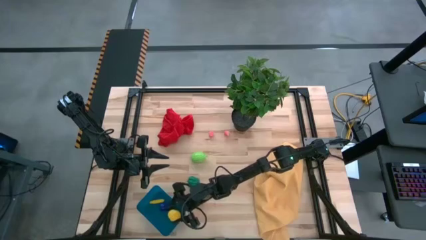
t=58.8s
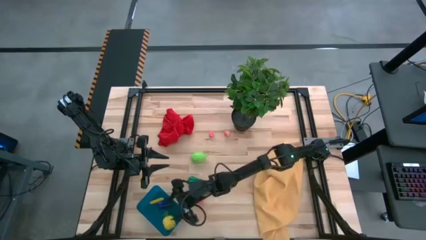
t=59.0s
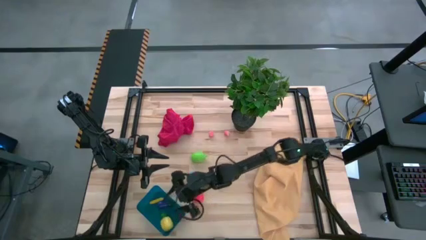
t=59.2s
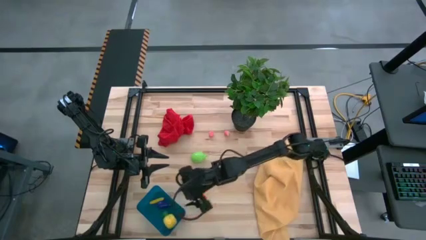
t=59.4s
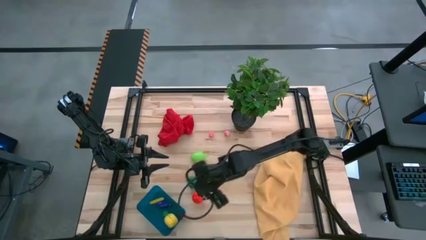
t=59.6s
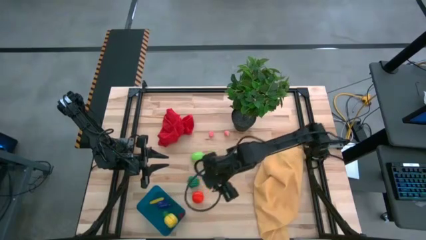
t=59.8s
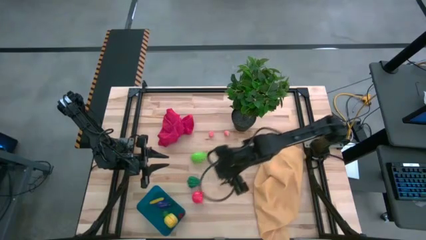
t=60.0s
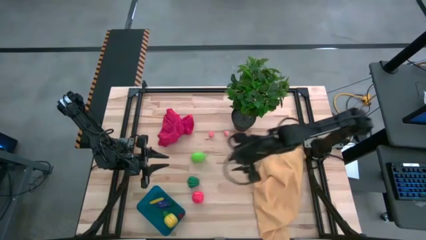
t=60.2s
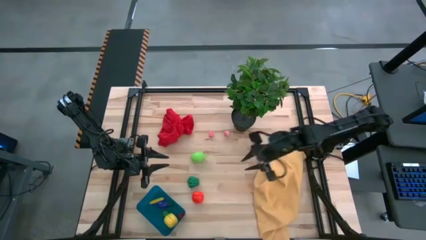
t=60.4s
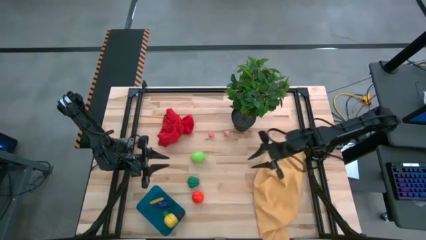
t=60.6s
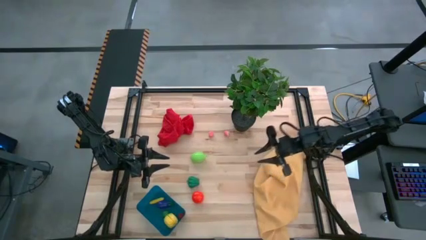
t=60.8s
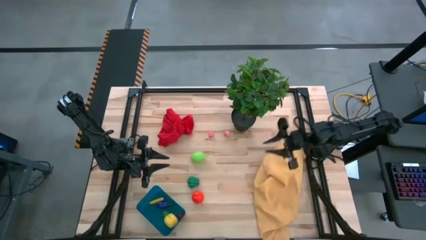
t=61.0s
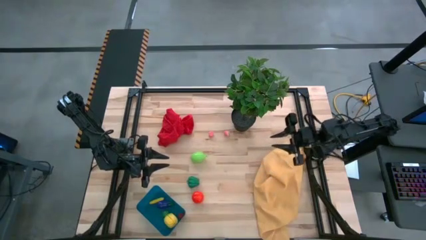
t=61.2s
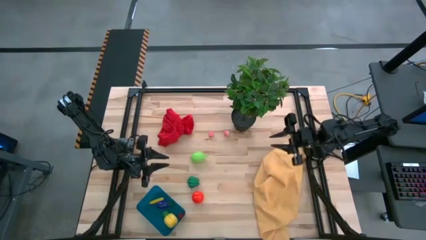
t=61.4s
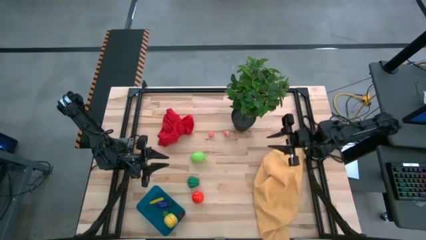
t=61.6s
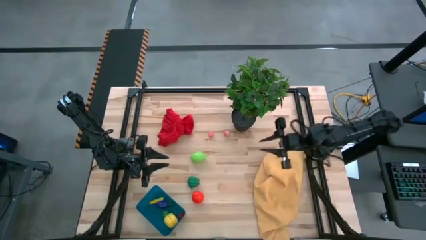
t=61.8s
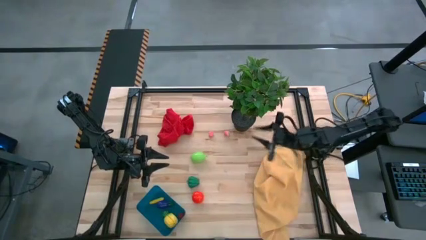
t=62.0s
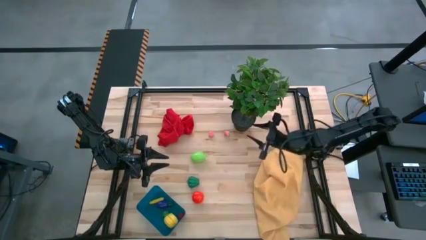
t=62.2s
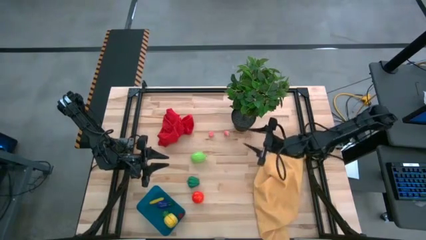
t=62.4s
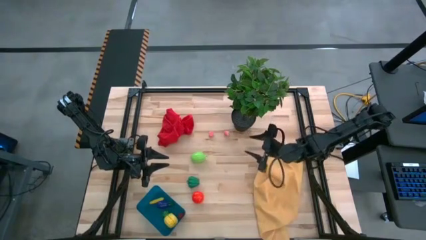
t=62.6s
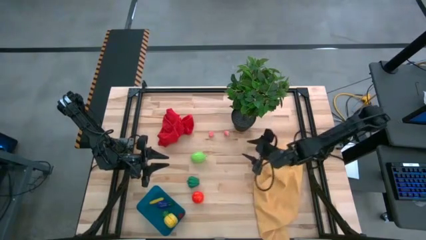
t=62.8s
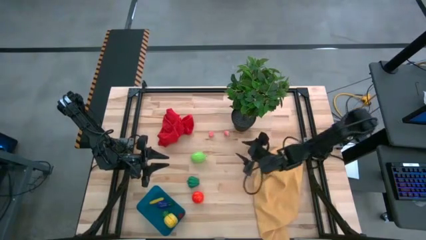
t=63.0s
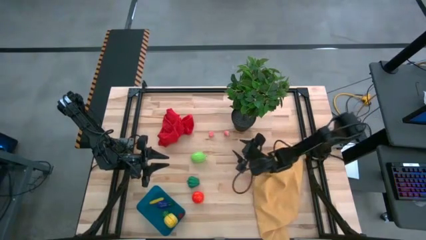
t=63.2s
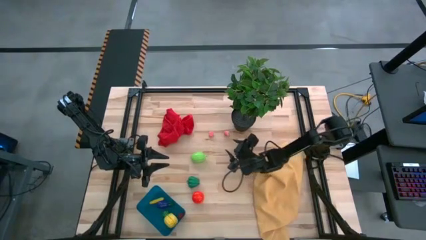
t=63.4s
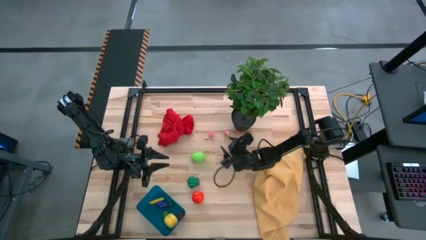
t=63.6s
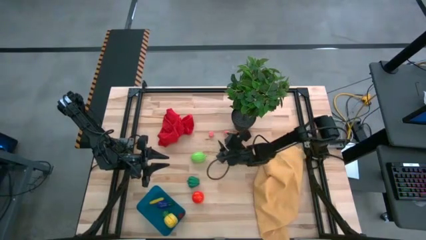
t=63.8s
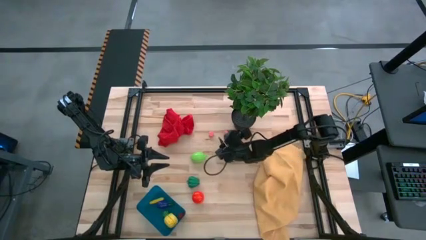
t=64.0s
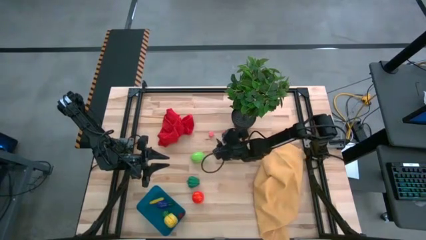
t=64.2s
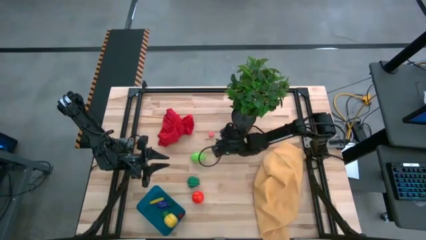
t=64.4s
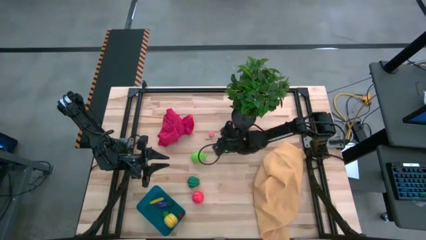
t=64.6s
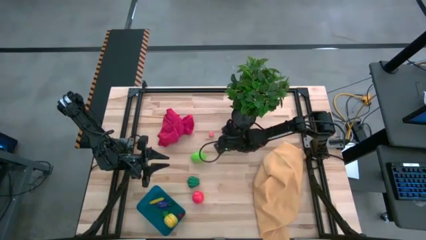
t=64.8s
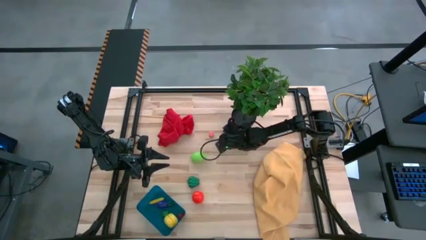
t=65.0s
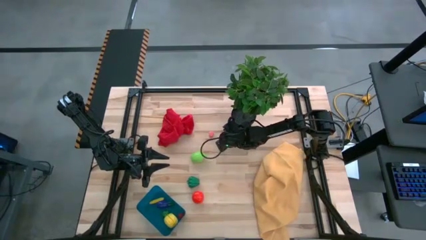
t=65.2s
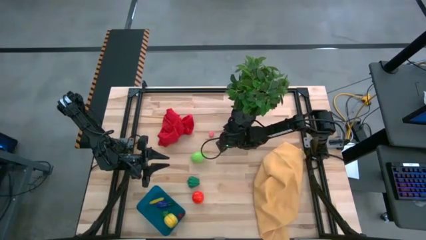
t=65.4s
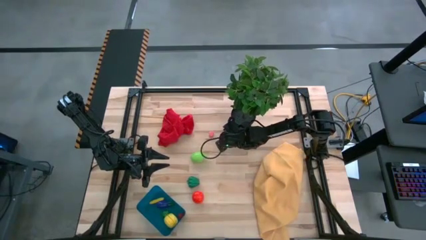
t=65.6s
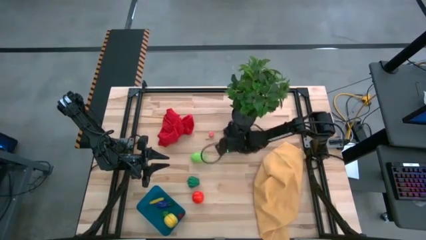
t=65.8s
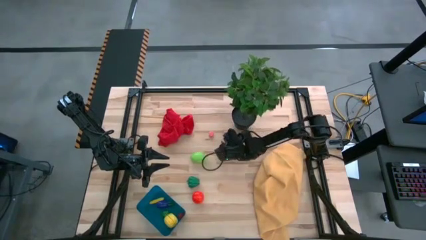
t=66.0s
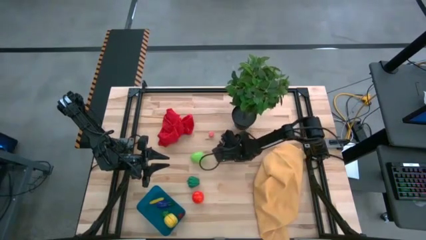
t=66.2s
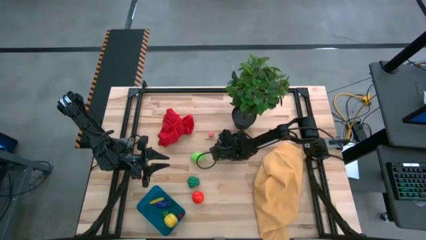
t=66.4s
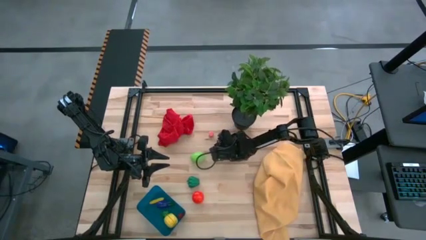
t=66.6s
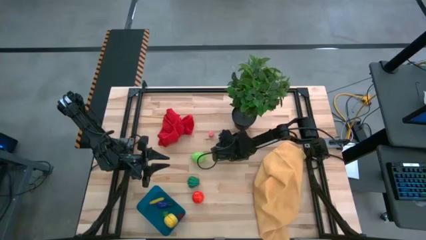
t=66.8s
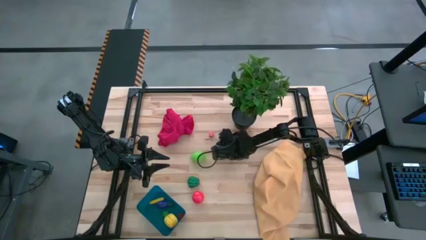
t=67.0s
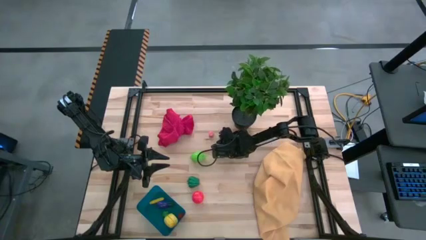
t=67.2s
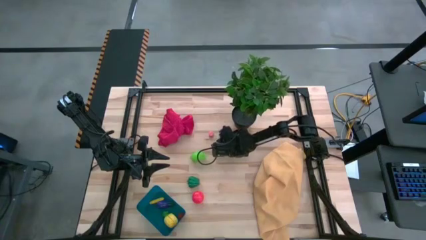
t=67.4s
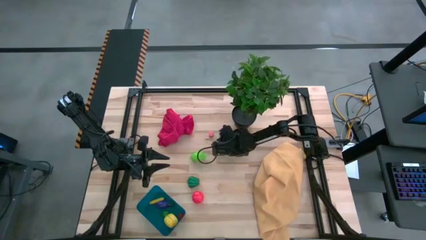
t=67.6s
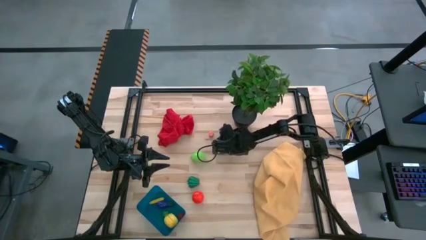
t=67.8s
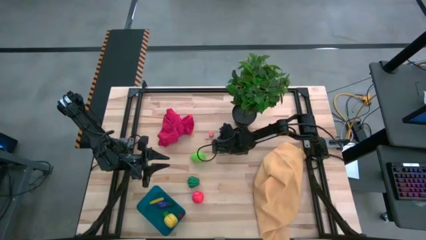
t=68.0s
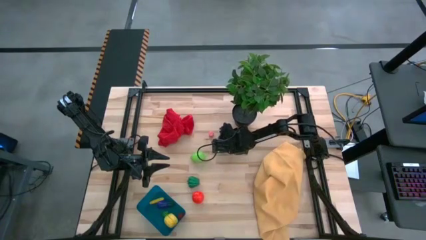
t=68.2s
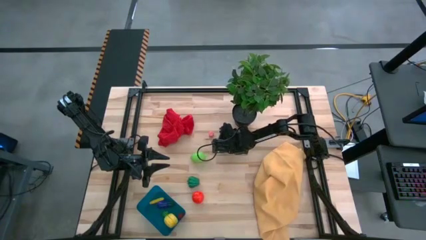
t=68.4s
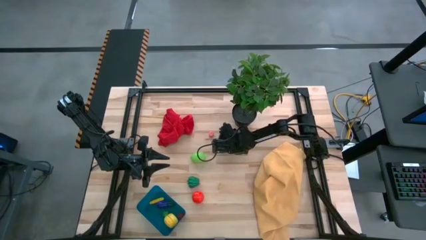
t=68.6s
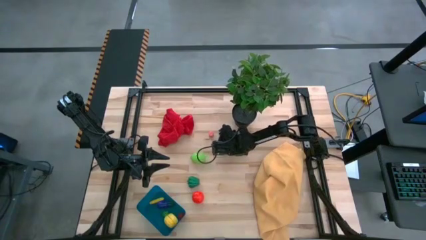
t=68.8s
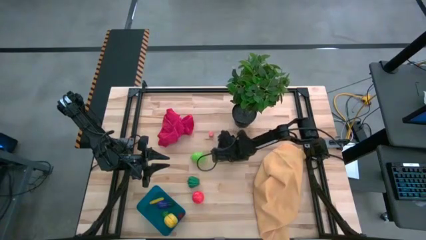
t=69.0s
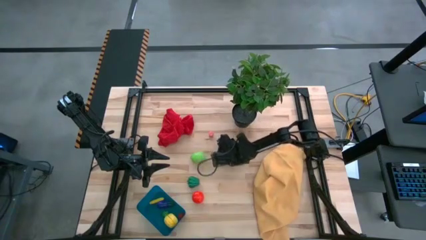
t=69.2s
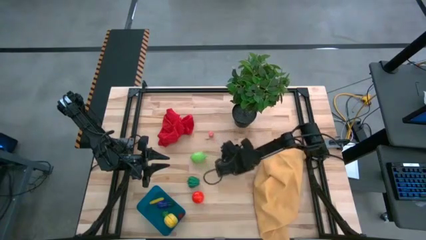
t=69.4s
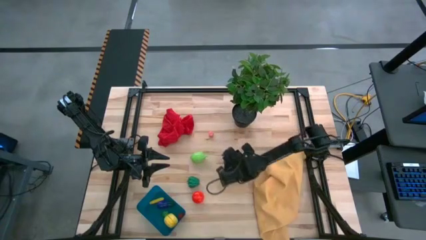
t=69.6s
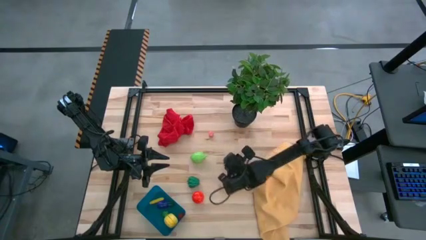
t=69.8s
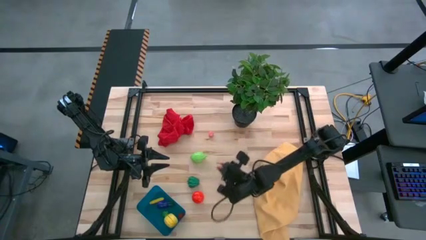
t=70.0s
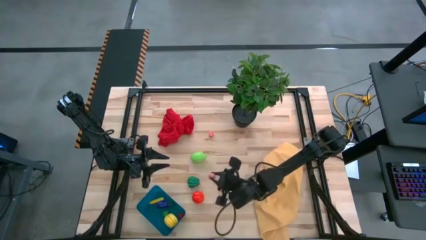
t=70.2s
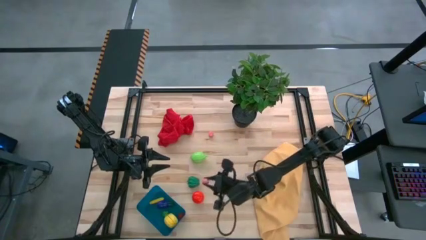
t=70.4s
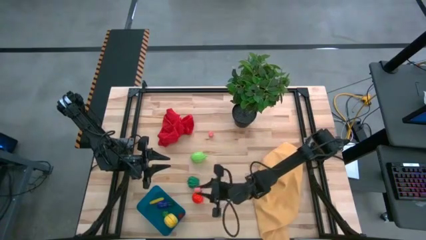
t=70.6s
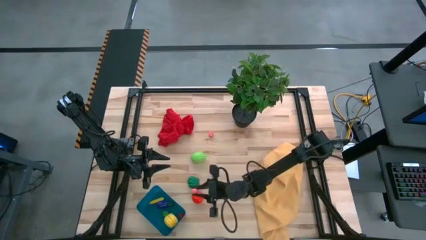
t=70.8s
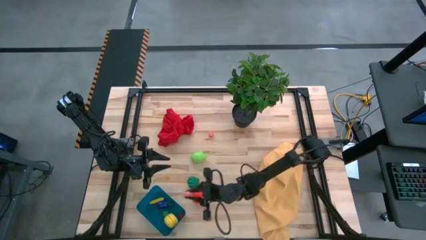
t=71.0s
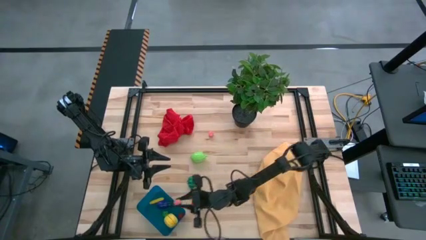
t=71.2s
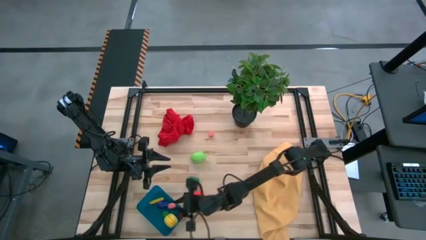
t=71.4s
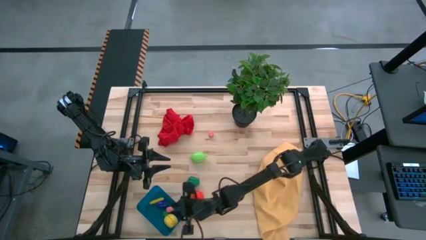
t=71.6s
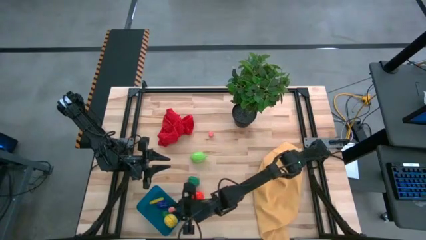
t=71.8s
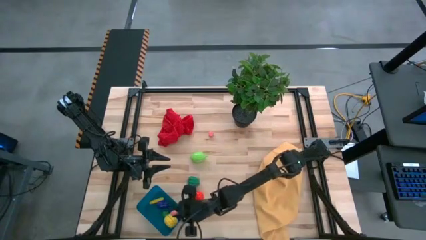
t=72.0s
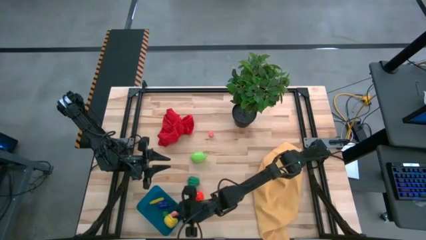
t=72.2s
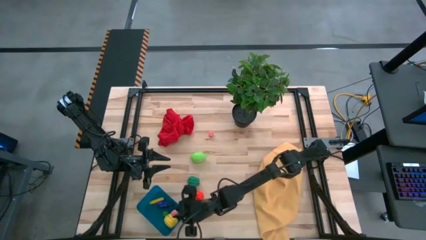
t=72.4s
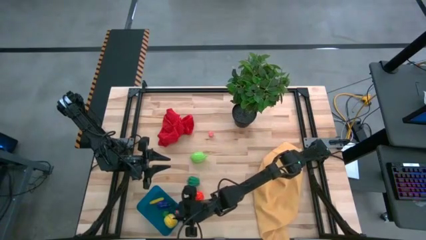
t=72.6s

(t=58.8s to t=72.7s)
Task: Pick and placing Produce into tupperware
Put the right pink peach into the blue bin

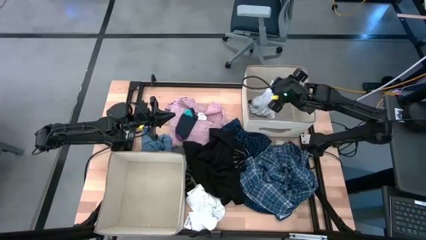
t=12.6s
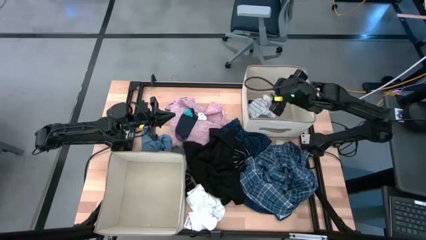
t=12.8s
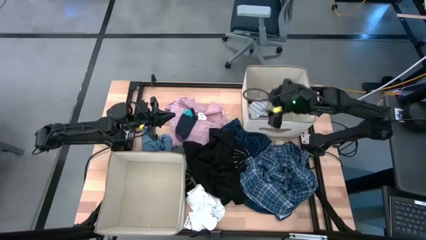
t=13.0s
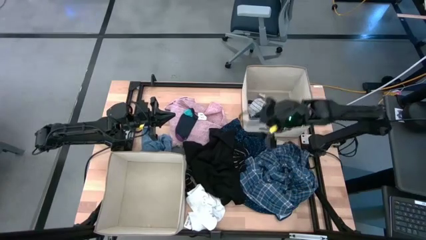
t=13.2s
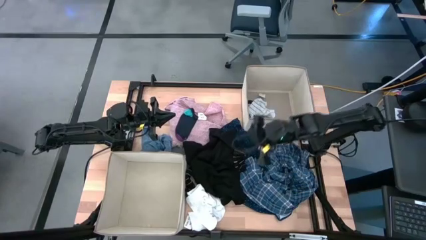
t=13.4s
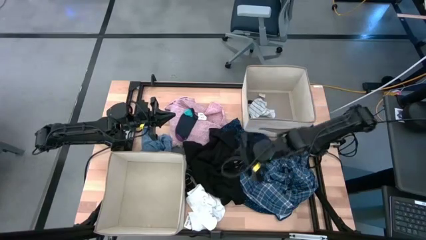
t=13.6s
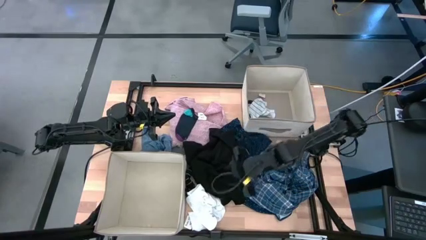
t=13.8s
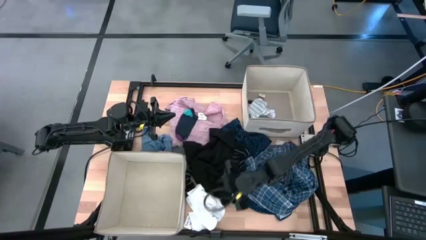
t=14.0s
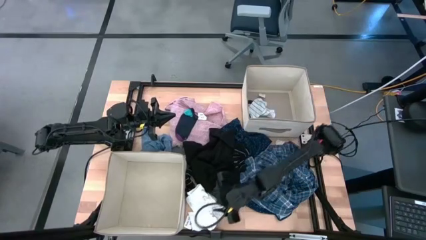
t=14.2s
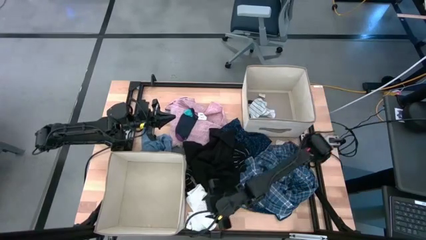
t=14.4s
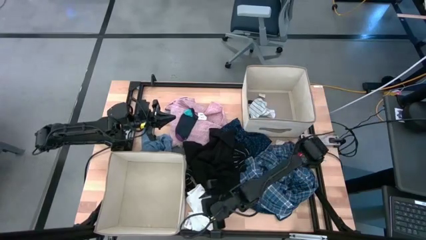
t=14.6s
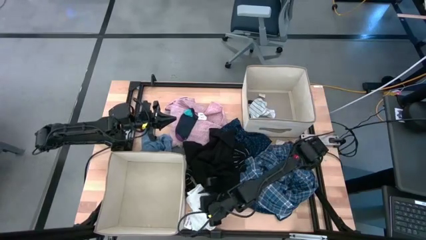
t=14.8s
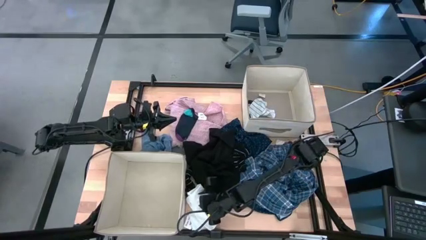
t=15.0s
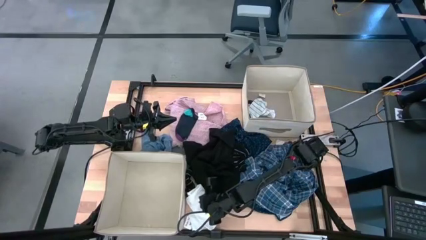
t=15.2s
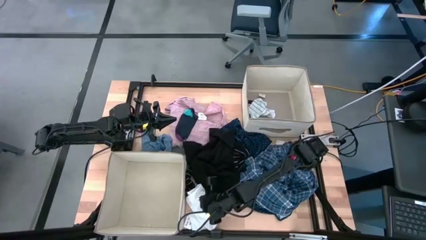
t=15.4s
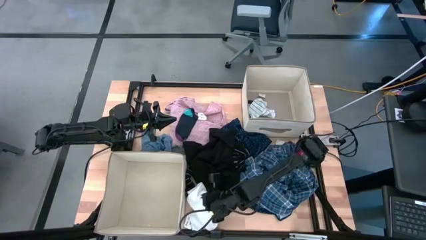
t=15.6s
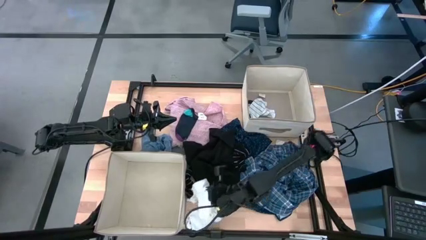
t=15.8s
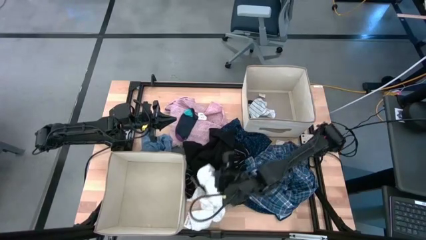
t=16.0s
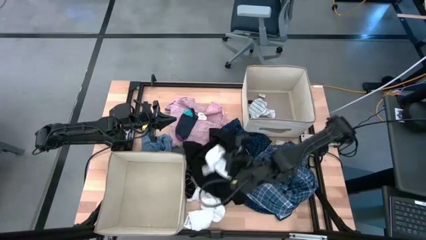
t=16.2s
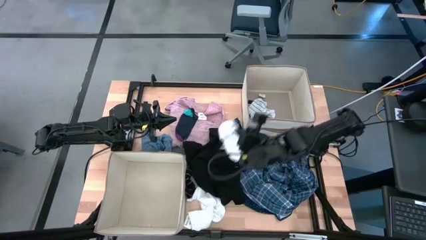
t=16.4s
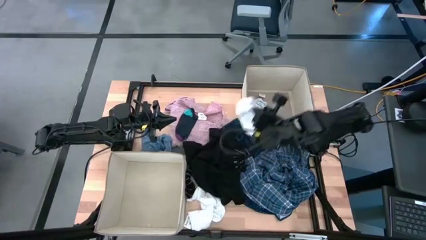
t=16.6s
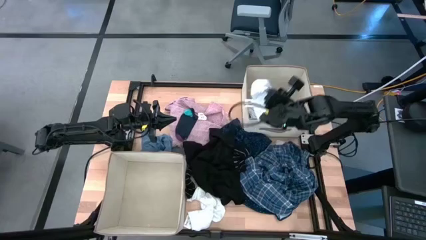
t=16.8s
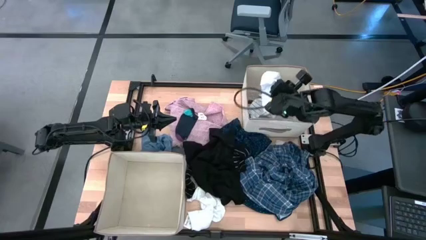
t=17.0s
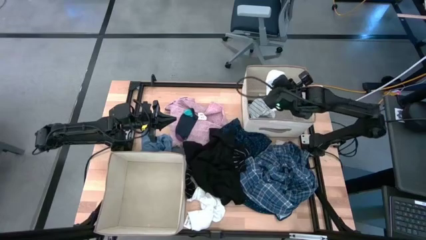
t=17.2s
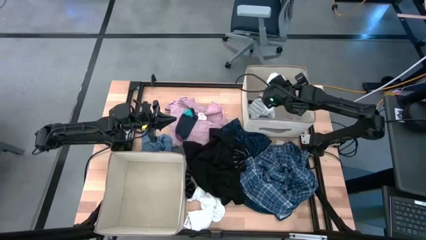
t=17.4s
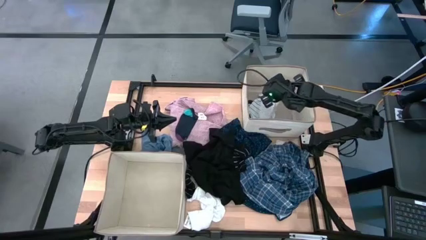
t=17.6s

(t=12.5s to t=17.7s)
Task: Sort clothes
Put the white sock into the top white laundry organizer
